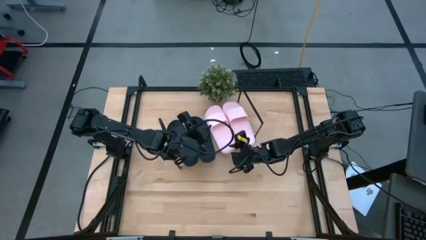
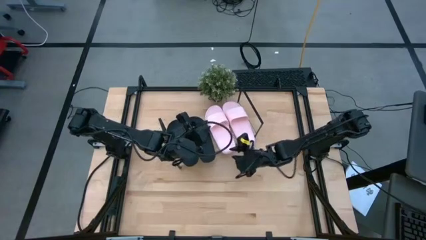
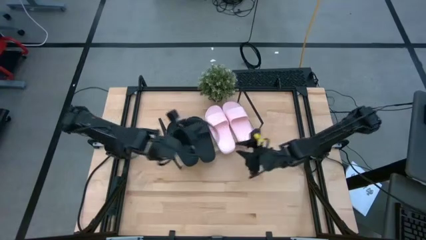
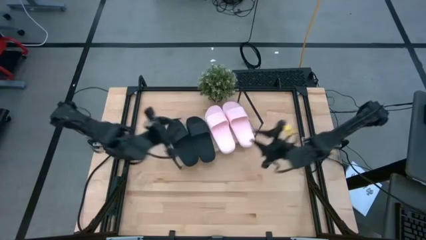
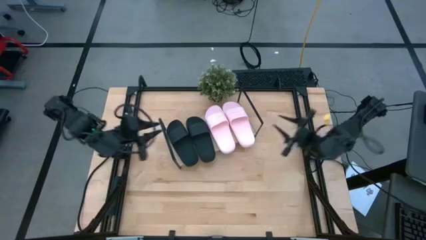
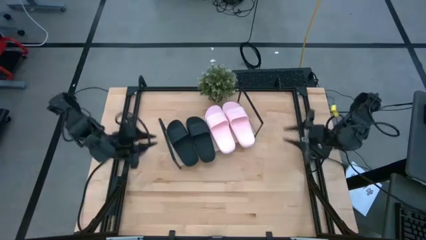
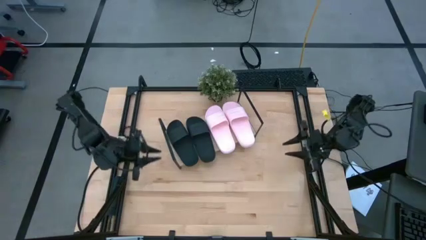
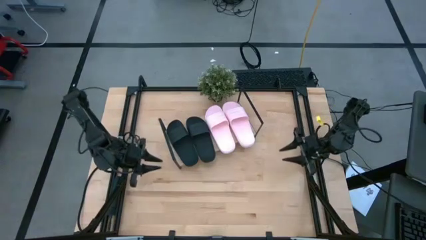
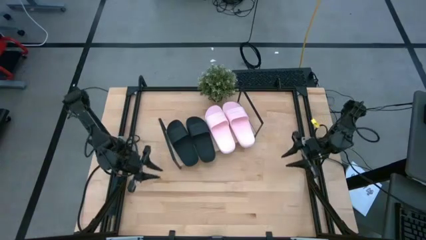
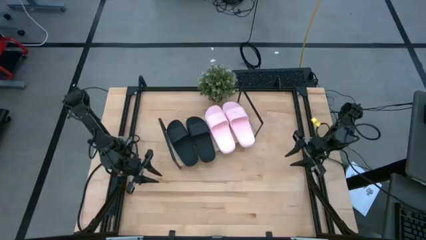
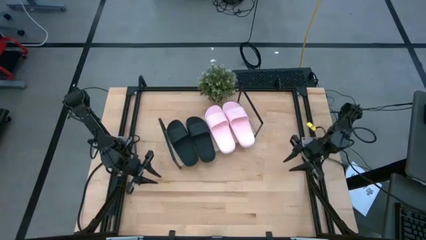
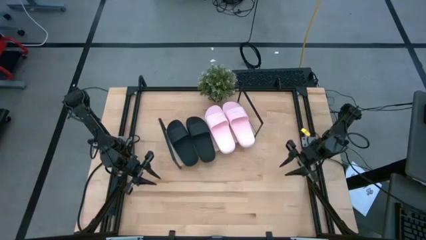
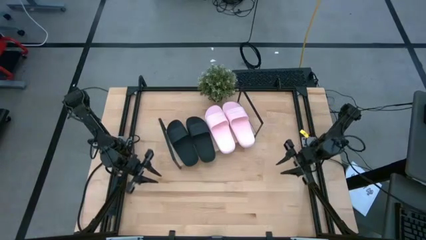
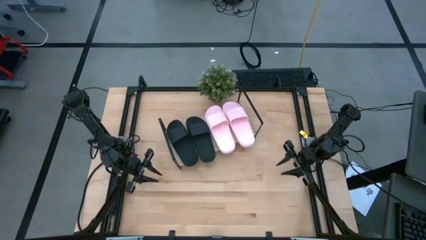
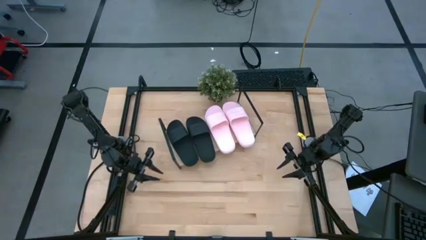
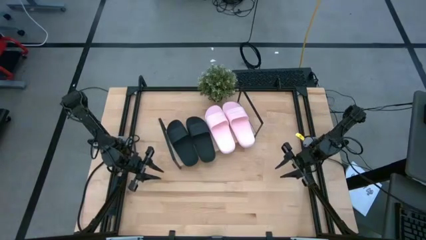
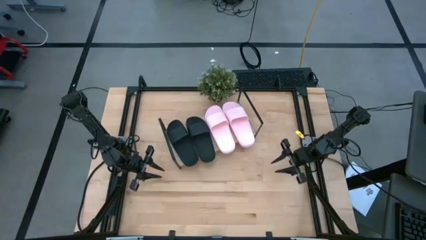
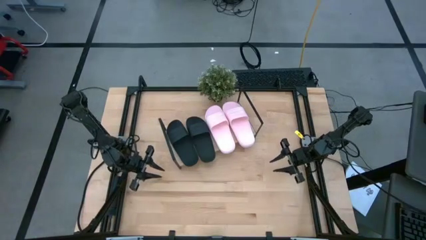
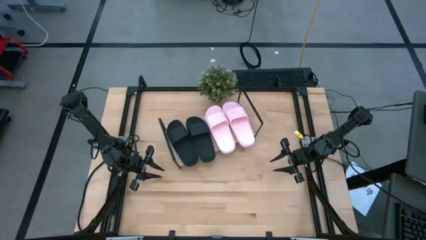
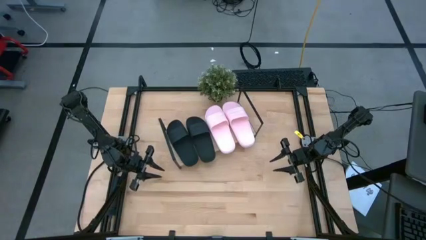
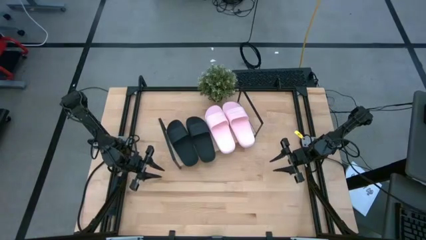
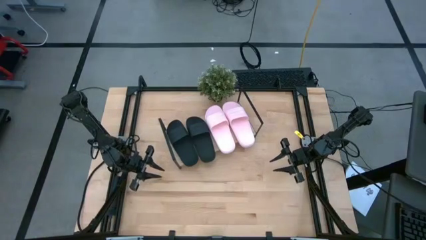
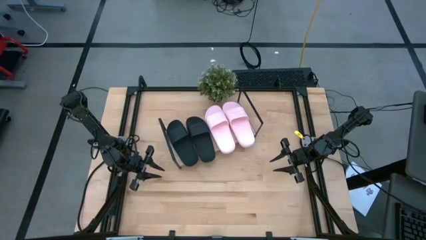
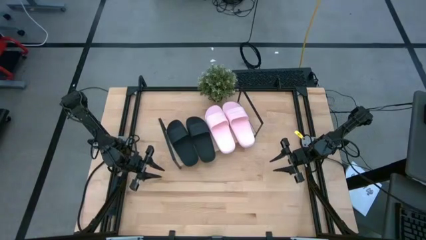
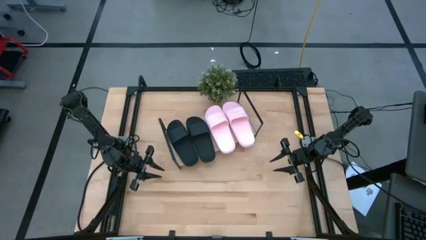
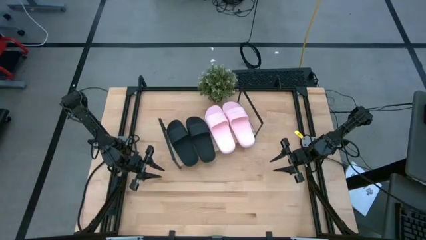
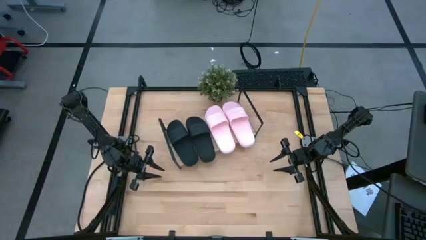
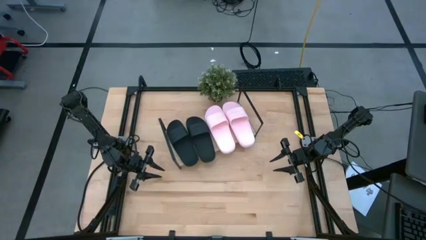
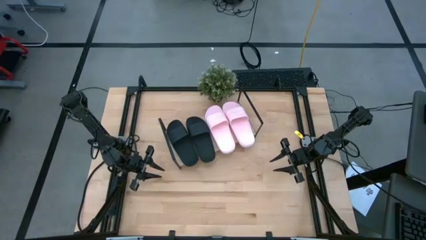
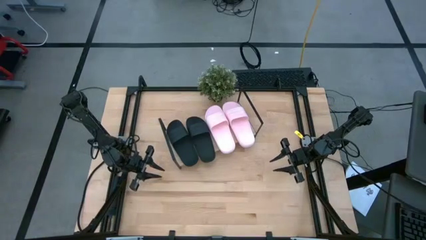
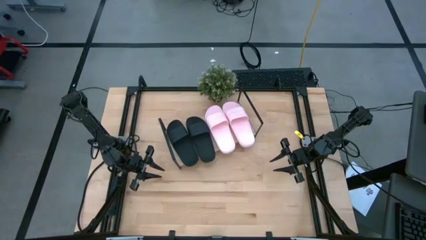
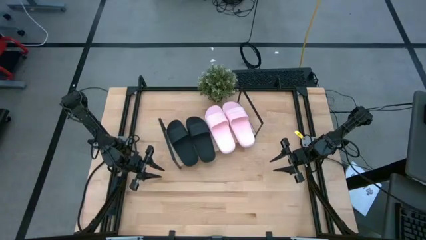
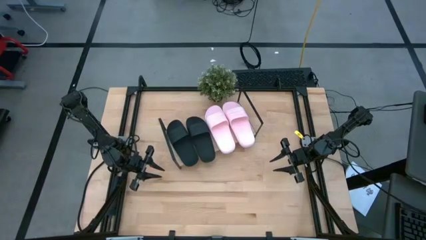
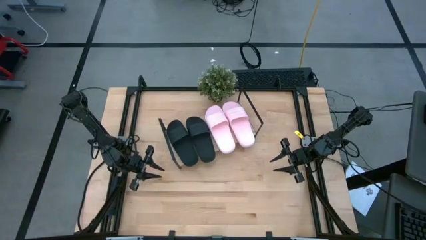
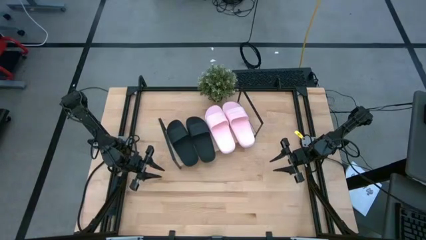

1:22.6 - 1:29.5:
Task: Pick and place slides into the shelf
Return to Home Position

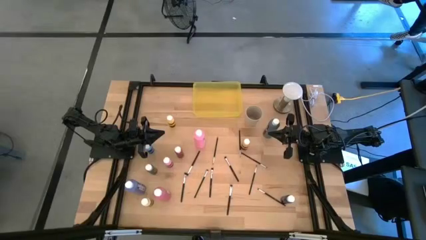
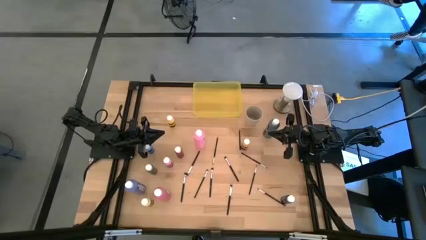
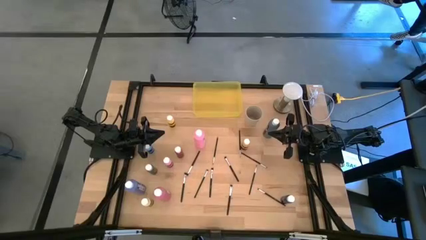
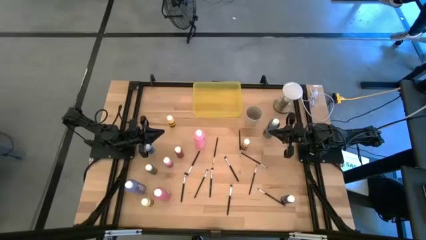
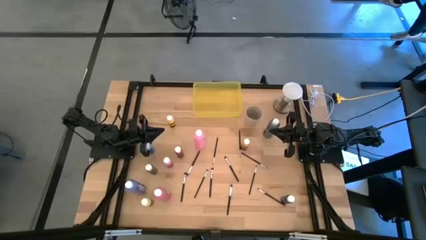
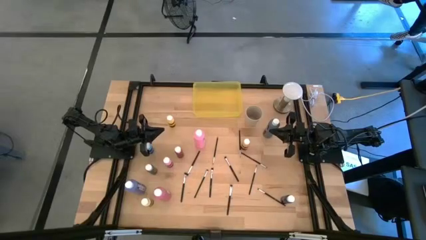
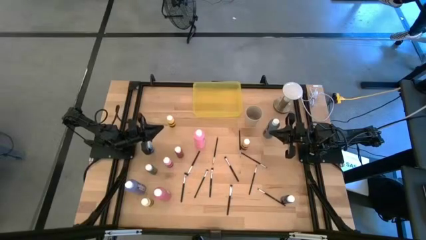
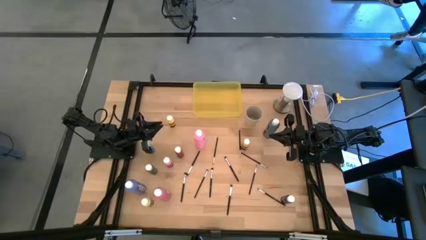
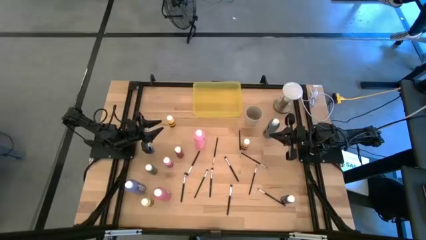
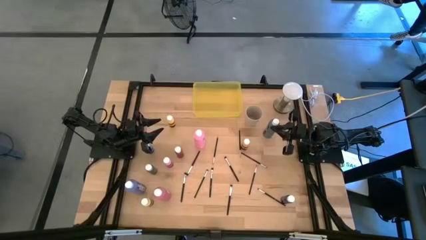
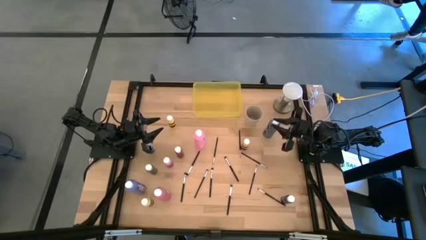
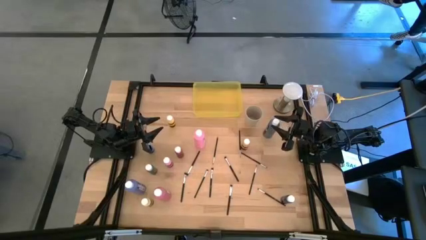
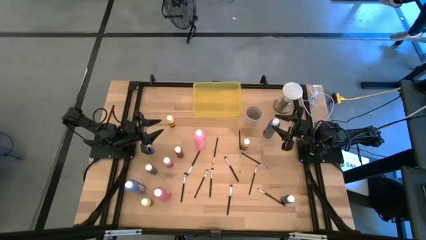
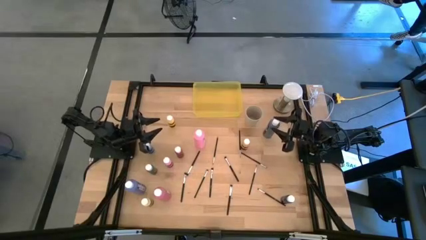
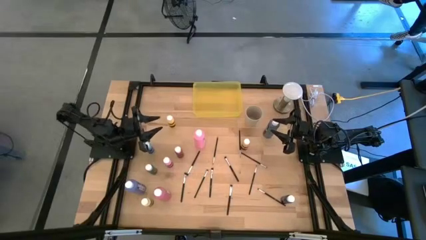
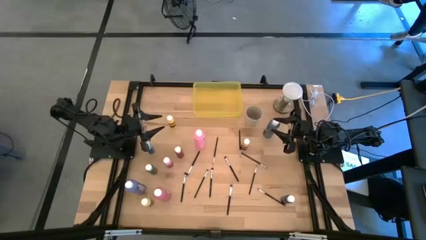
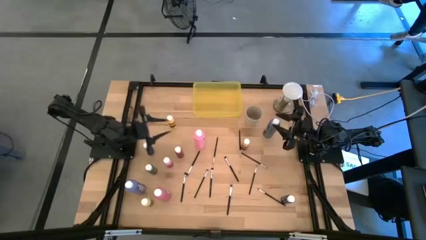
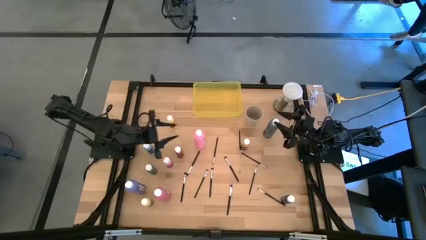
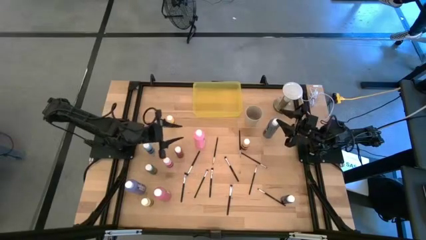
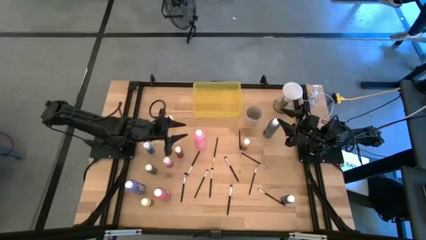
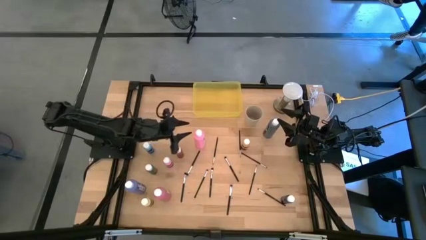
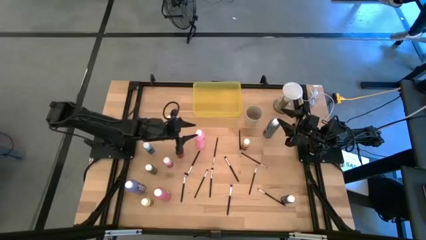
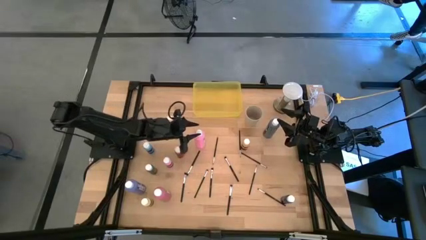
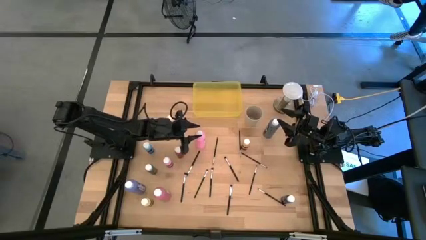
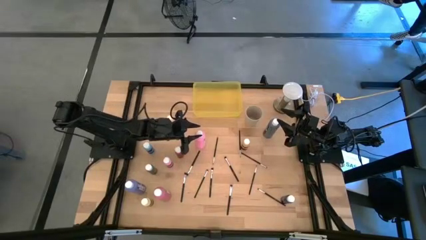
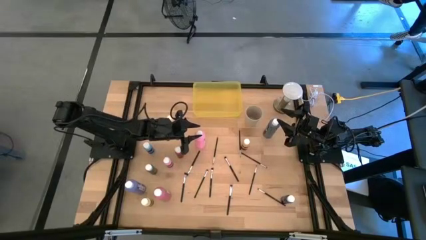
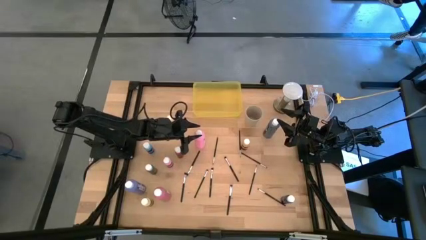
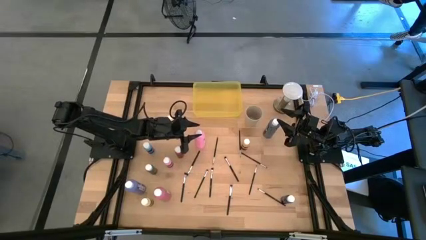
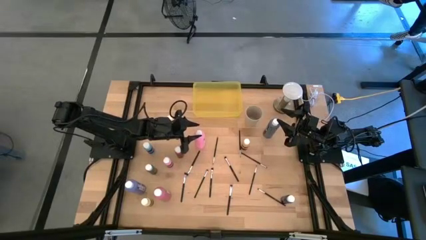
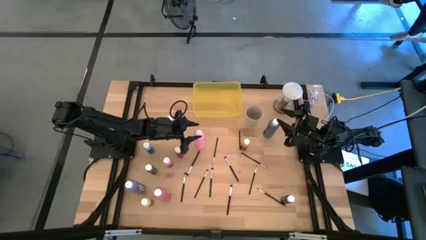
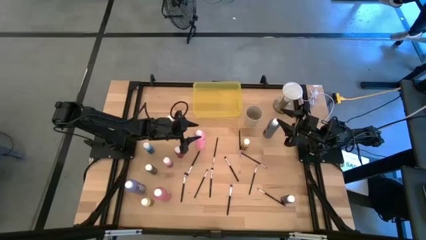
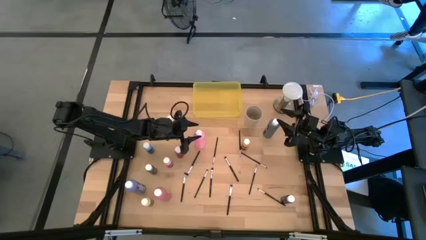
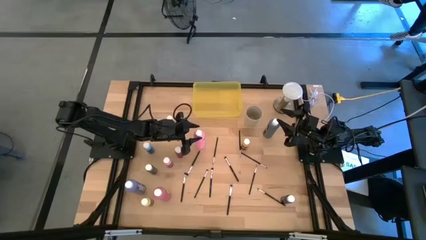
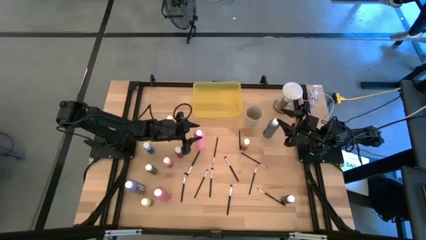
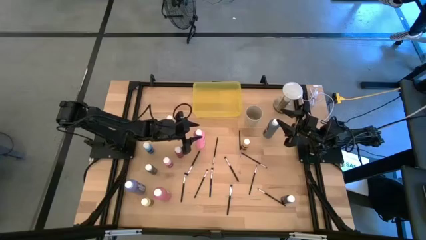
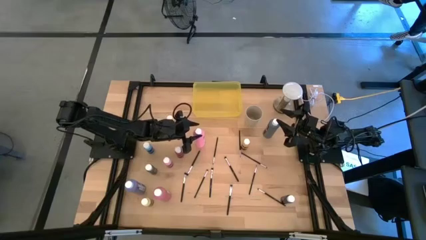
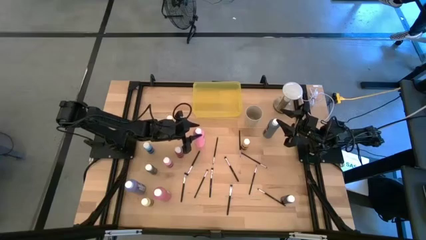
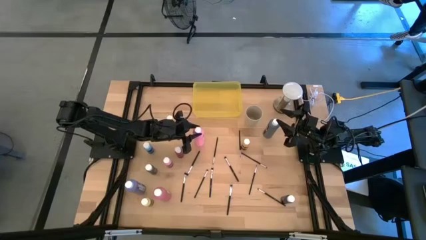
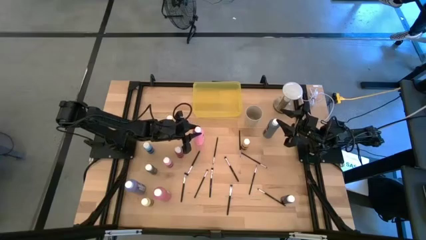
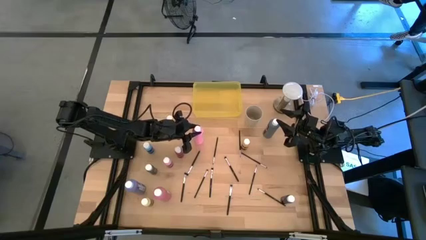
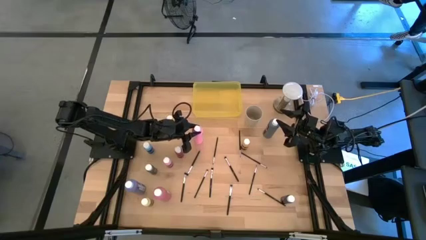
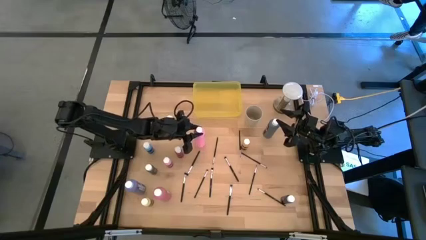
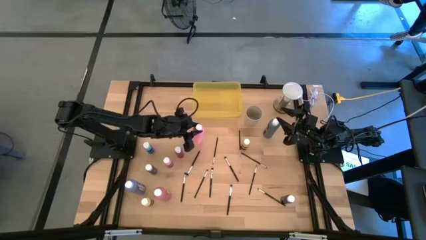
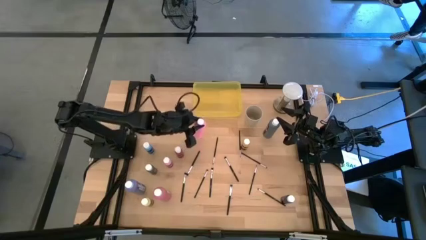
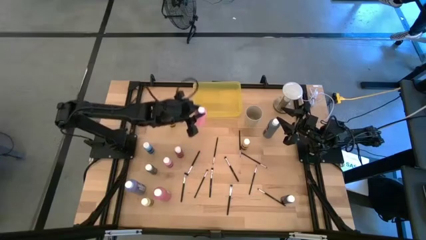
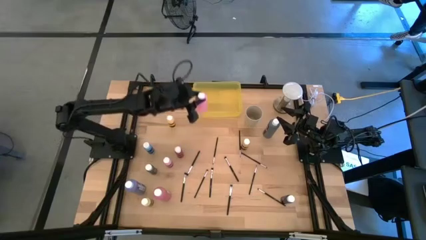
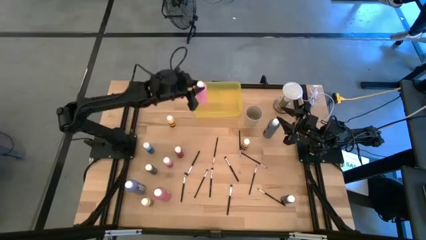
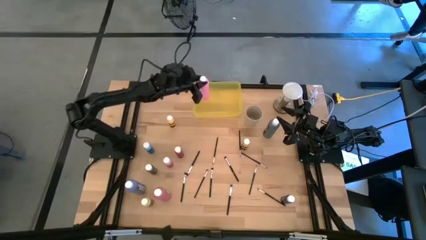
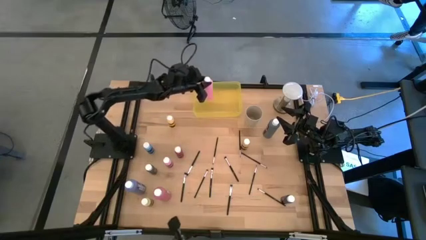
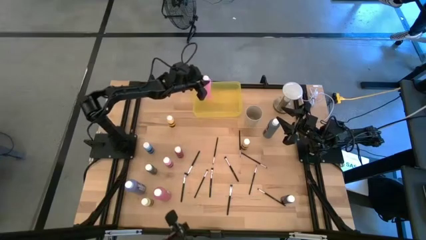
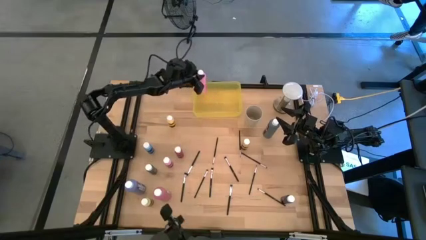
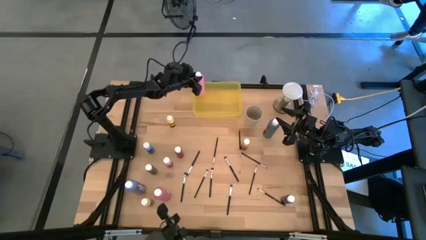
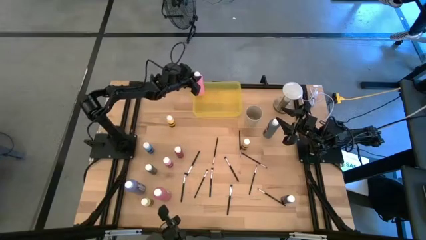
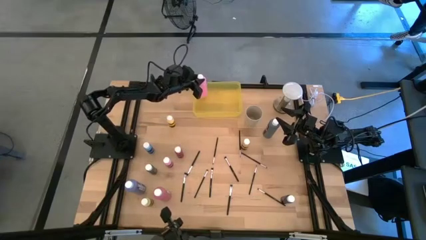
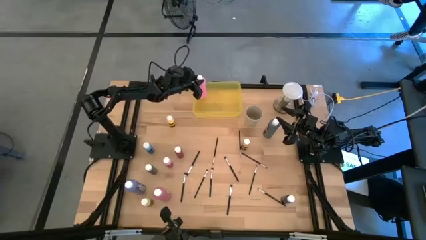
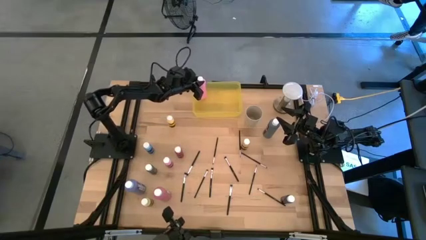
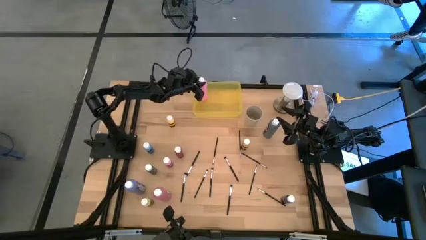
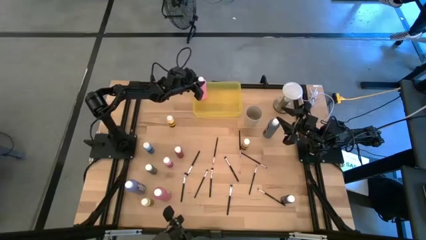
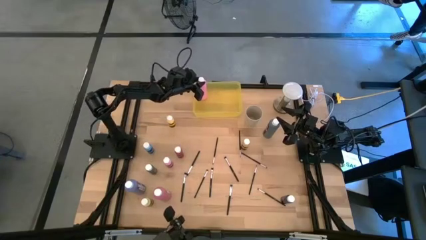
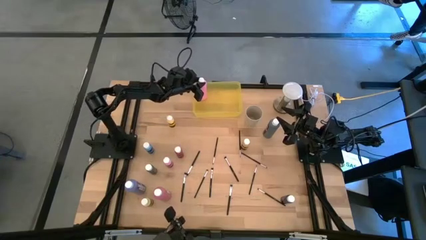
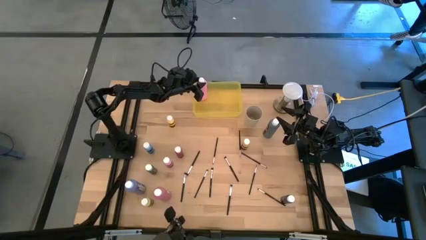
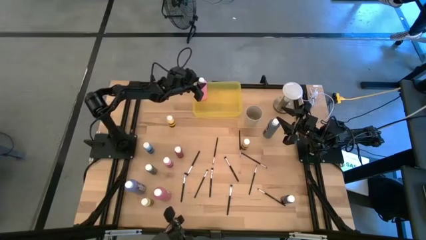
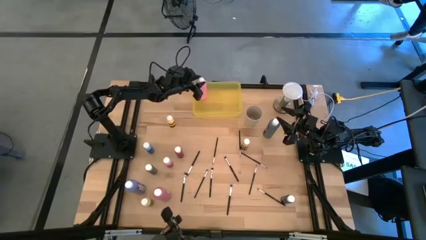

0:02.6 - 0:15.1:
Task: Pick & Place Paint Supplies
Put the large pink paint bottle into the yellow bin
